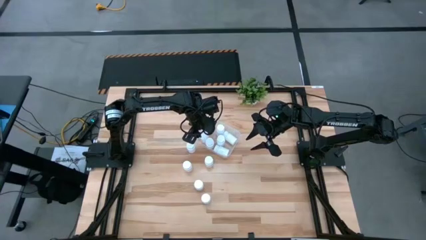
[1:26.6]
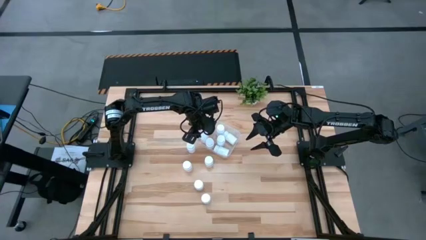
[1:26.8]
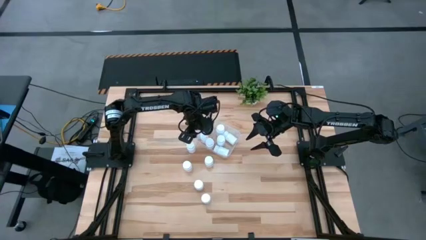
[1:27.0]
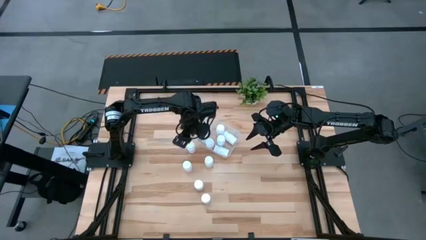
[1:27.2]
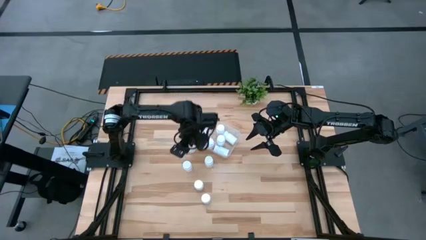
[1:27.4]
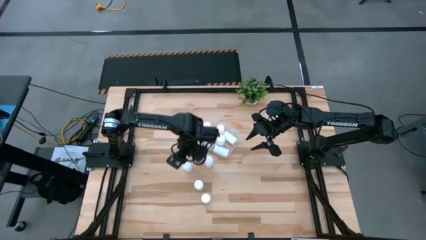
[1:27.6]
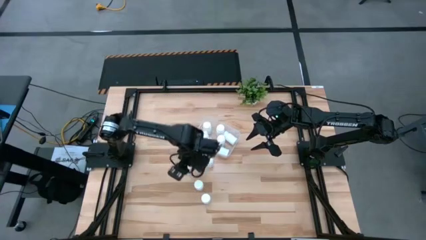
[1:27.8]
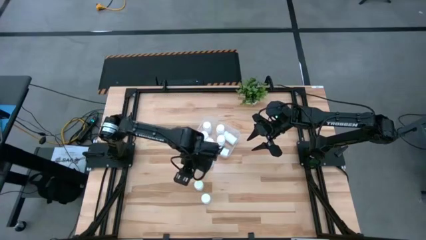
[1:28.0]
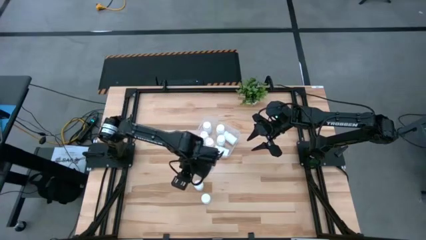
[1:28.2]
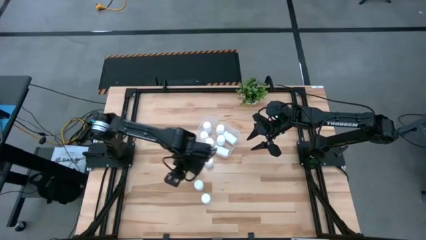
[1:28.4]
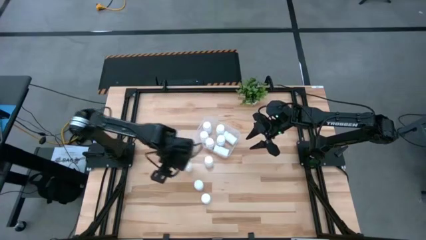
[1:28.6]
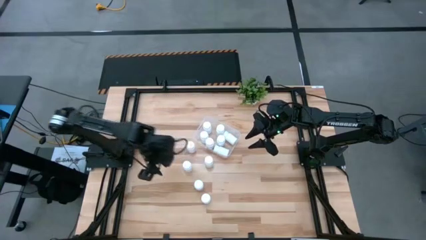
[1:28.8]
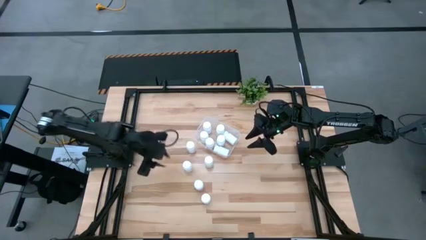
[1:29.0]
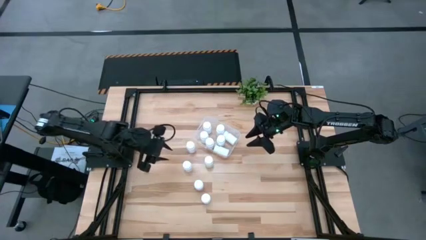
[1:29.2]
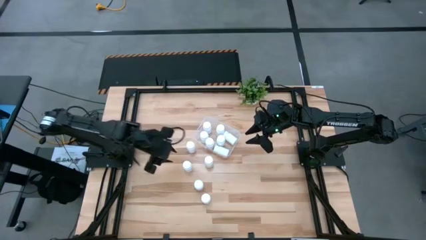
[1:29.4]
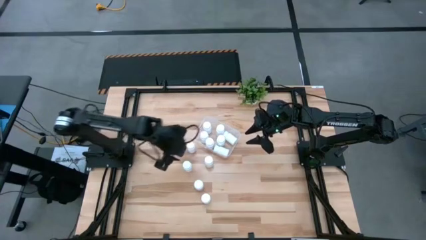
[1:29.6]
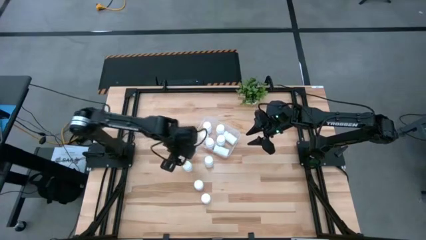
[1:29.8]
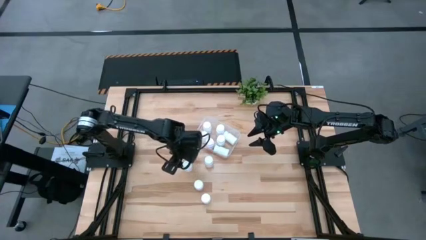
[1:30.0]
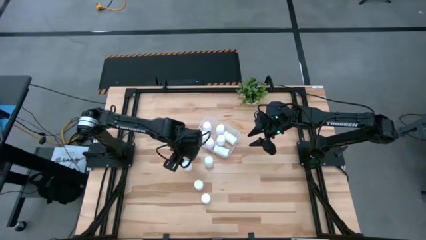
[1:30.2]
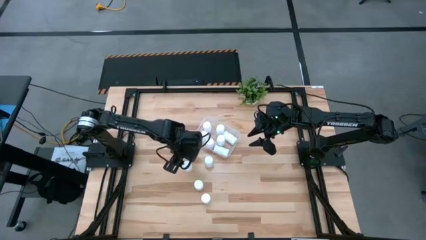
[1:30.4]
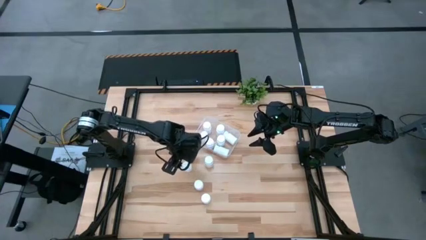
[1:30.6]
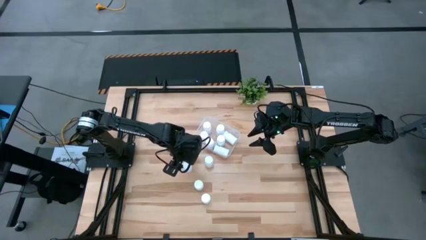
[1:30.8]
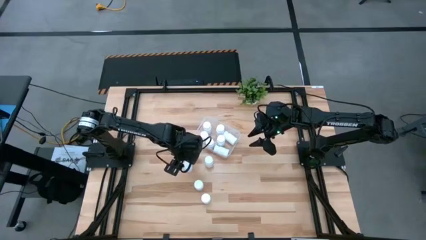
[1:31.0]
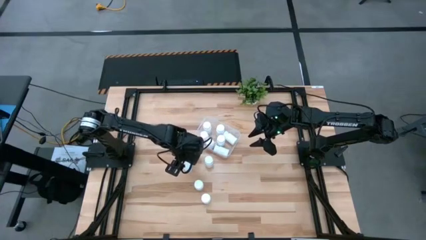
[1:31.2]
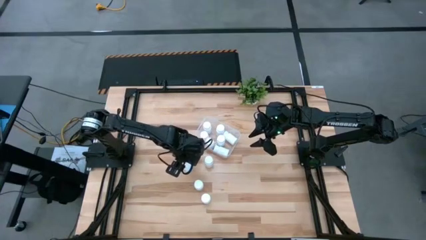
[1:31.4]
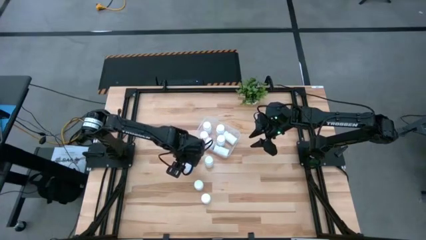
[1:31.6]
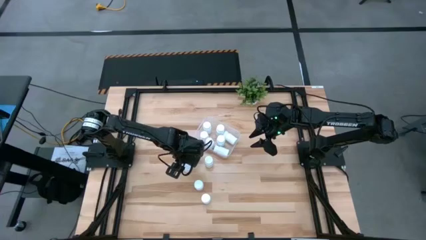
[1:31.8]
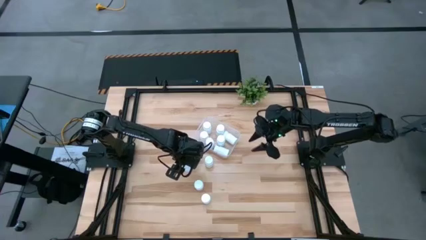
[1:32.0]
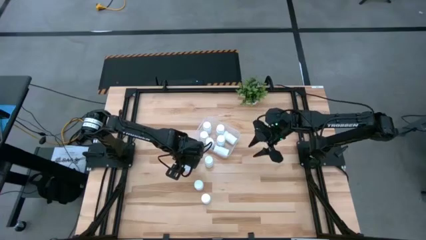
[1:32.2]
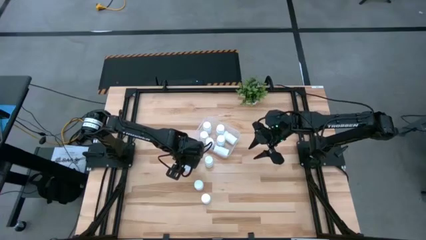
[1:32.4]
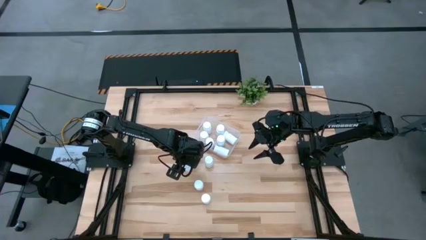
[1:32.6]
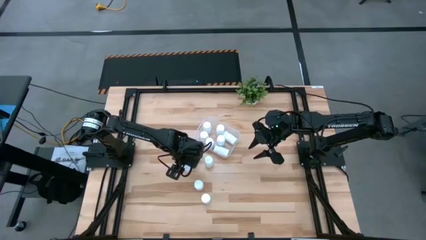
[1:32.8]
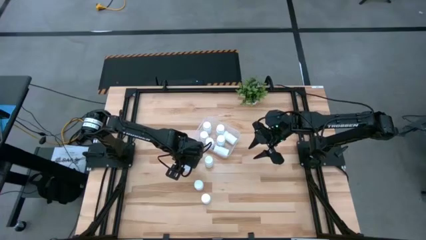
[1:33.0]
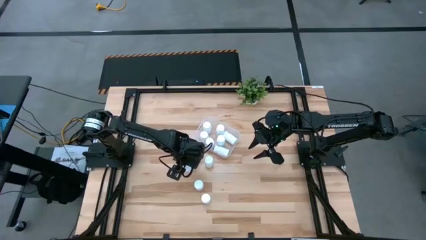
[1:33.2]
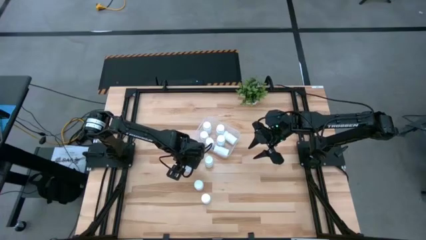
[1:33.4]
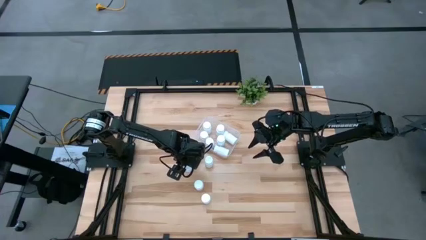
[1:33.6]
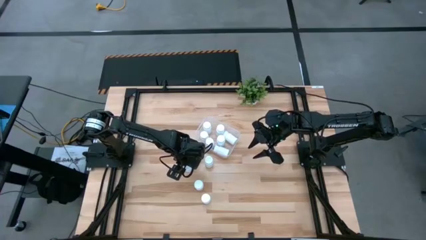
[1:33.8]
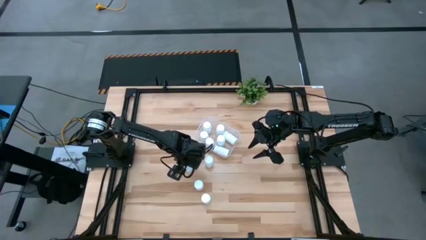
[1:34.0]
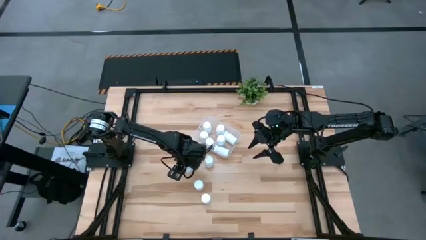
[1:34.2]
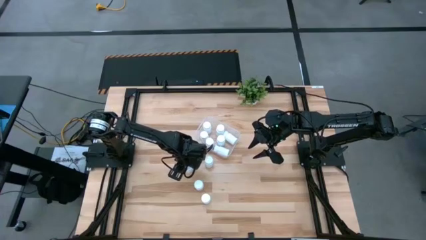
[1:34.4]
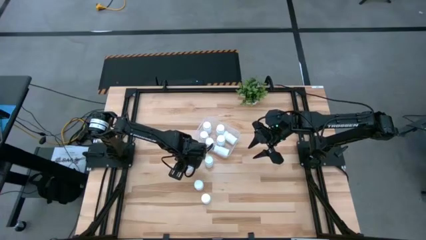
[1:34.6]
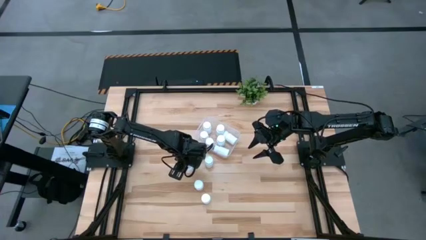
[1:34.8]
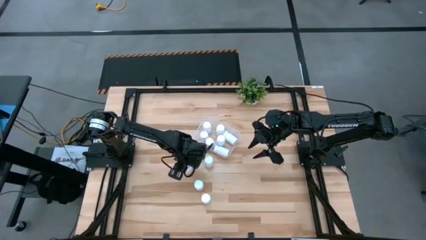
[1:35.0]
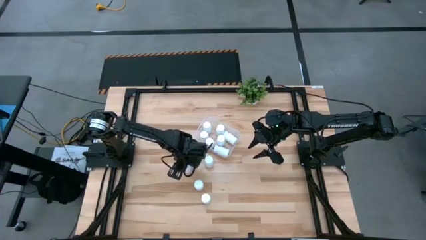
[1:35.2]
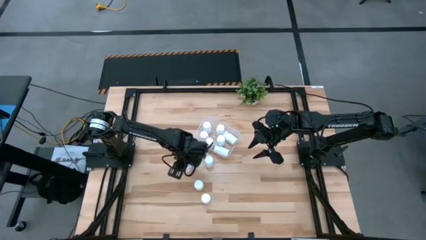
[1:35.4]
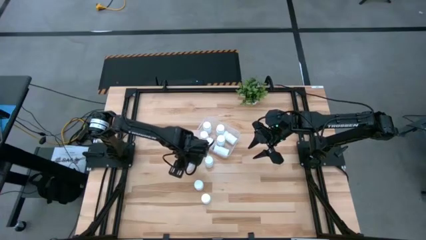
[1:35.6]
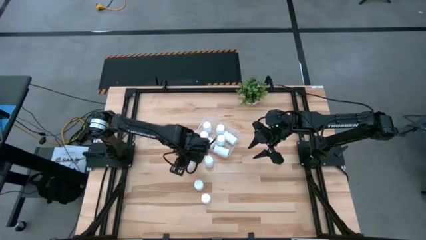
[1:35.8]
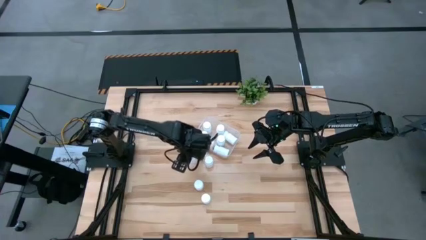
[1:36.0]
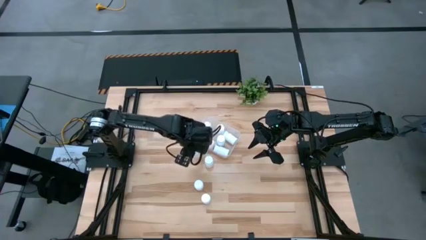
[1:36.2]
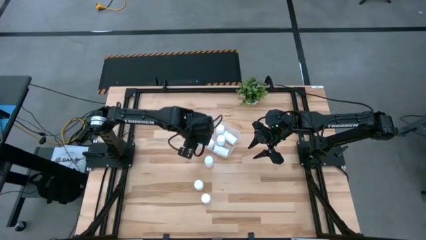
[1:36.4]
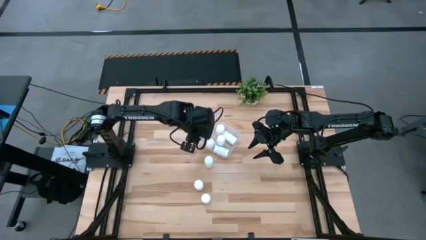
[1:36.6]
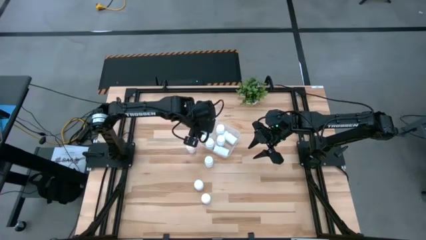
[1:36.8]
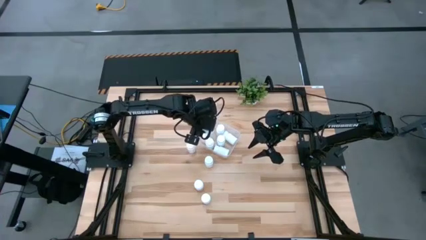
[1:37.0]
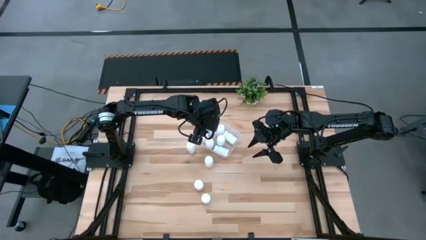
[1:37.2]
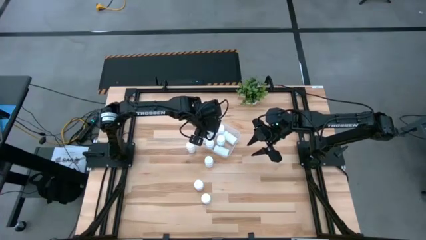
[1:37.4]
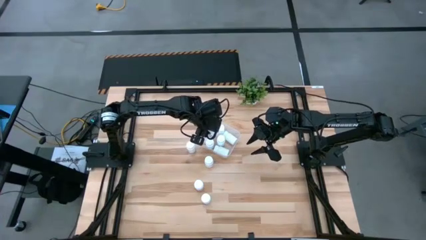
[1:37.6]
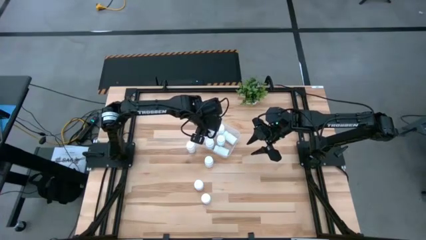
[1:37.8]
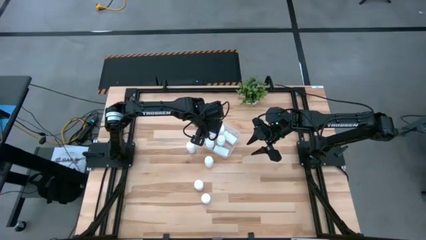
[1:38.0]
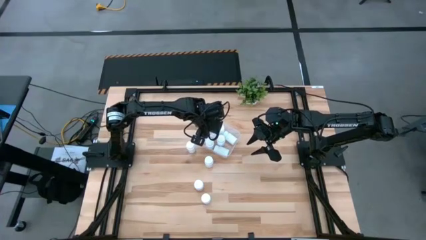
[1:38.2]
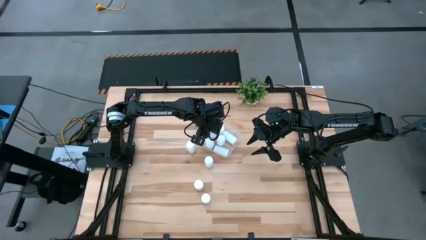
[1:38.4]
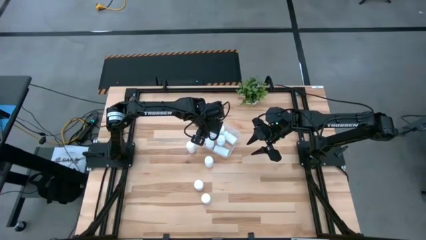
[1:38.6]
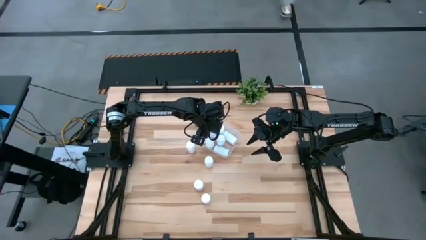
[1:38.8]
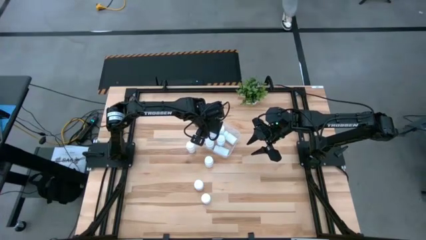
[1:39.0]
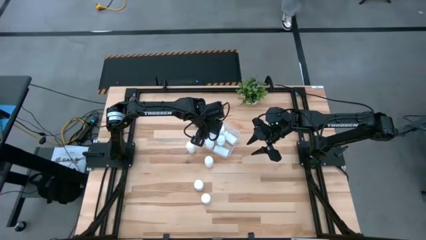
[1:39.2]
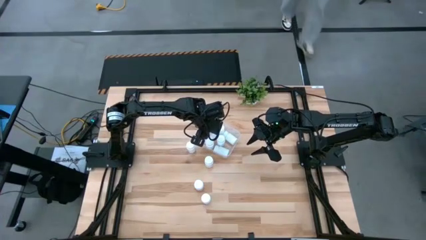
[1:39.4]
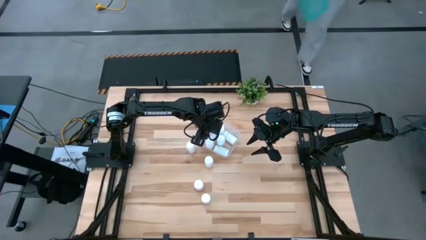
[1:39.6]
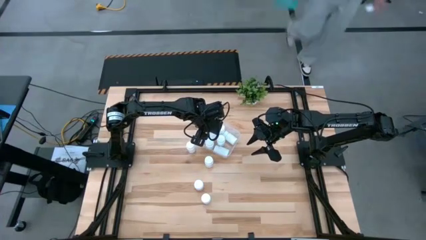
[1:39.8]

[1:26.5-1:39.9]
Task: Pick and place pill bottles into a basket
Put the pill bottle into the bin

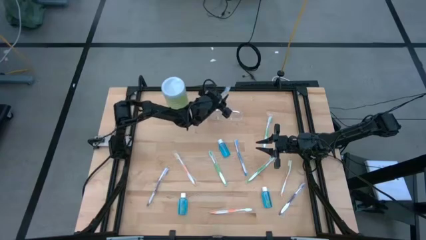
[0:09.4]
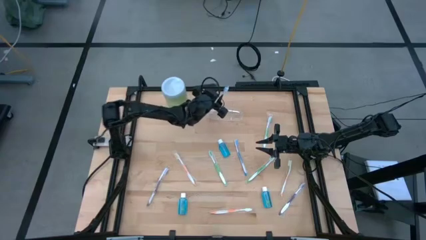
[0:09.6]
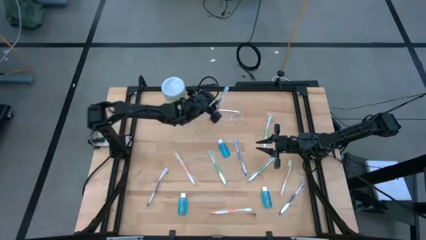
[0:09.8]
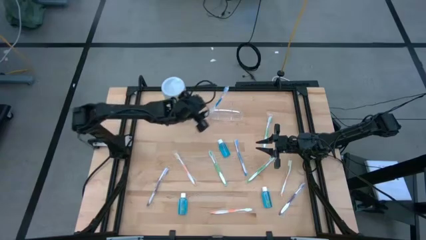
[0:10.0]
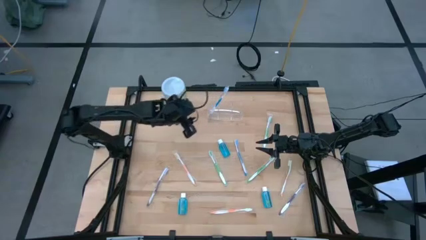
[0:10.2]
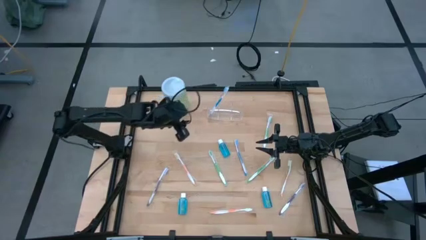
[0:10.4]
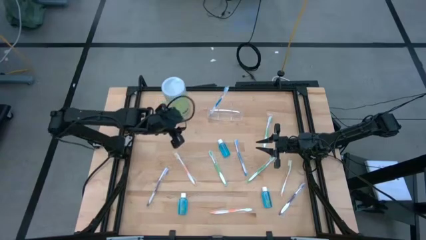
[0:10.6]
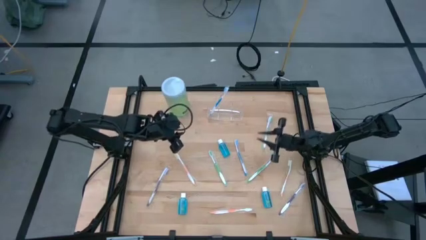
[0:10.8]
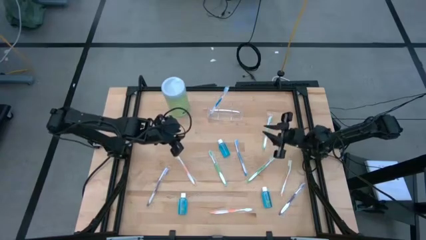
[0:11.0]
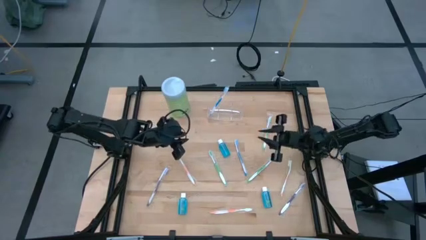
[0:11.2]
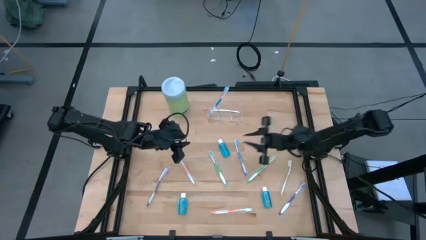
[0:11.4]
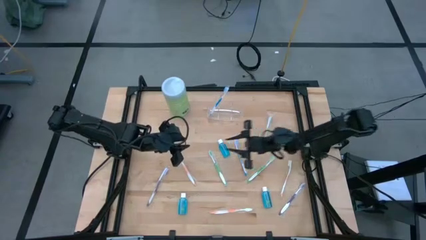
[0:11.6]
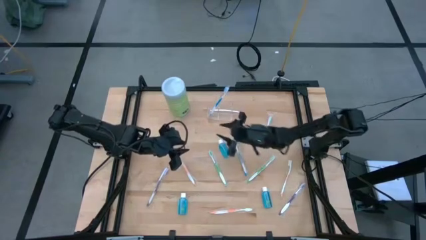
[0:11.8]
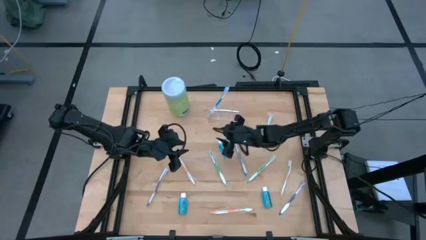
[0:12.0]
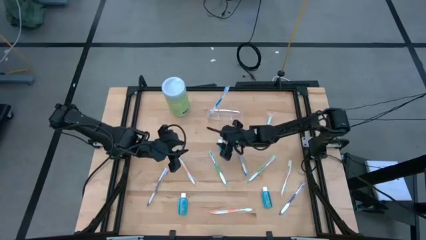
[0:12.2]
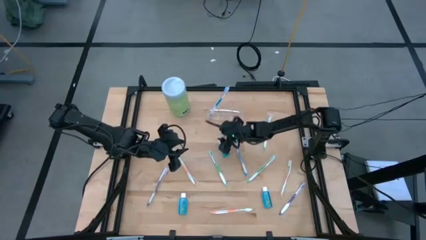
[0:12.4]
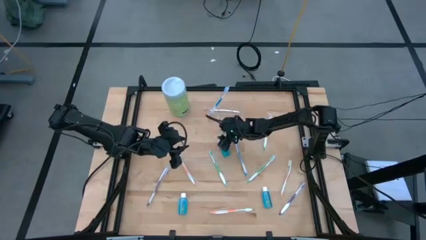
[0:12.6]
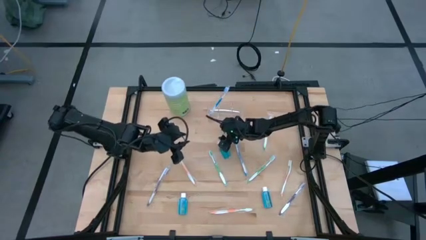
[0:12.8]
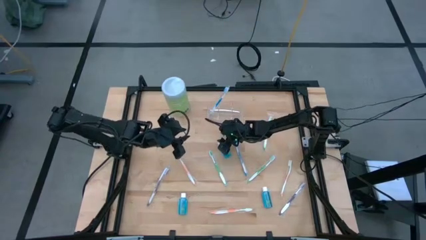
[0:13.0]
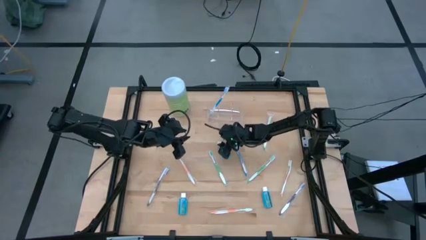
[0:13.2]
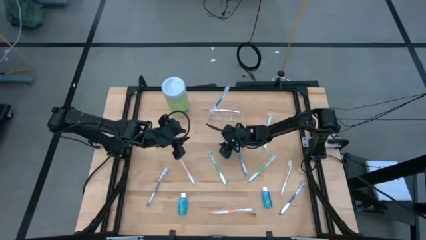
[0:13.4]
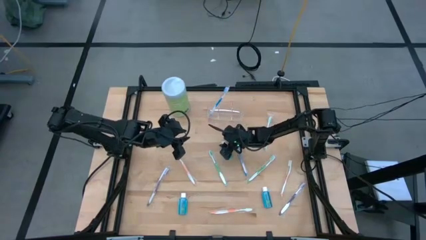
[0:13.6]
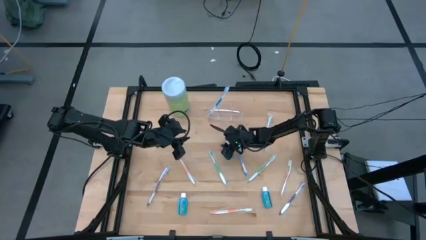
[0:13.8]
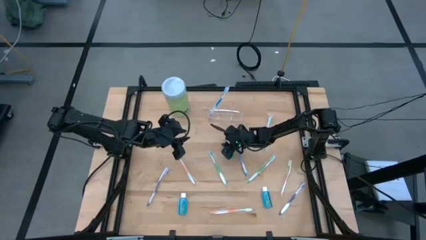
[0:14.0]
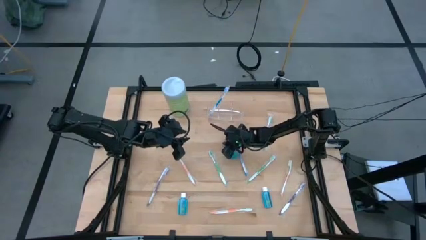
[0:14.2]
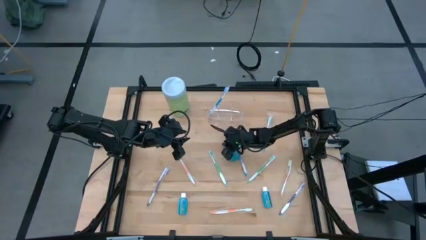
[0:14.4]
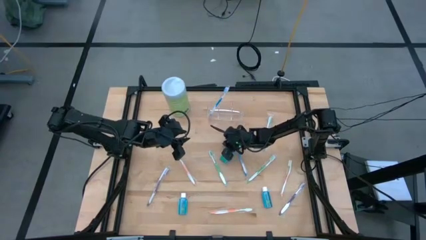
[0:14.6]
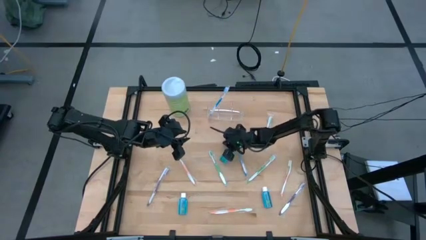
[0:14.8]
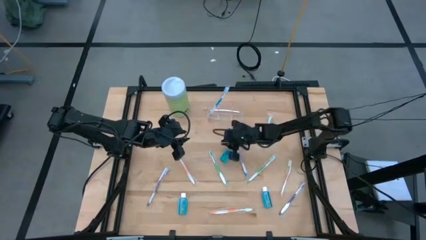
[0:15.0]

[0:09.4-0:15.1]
Task: Pick & Place toothbrushing station
Put the top mouthwash bottle into the transparent organizer
